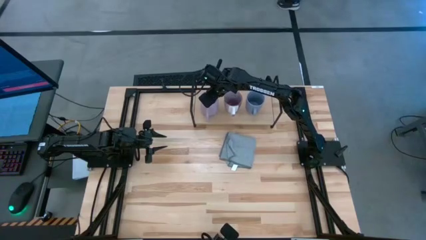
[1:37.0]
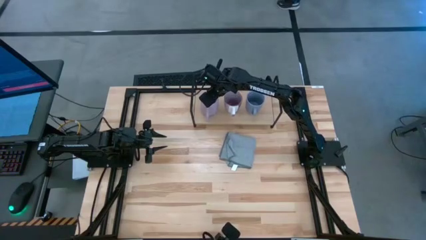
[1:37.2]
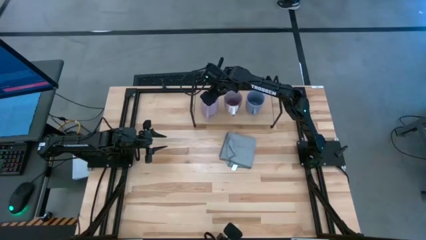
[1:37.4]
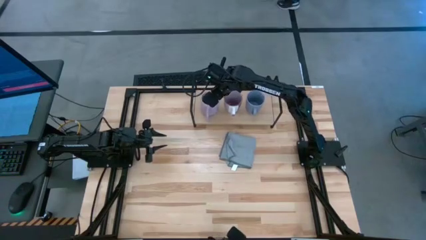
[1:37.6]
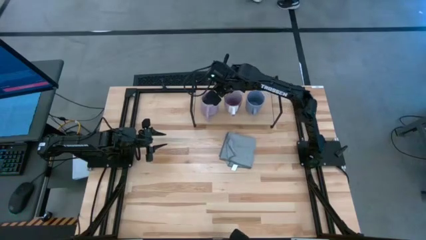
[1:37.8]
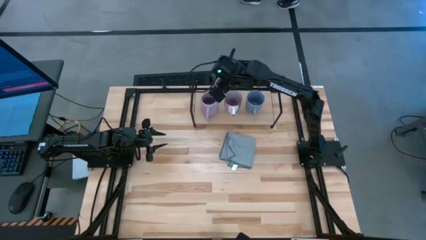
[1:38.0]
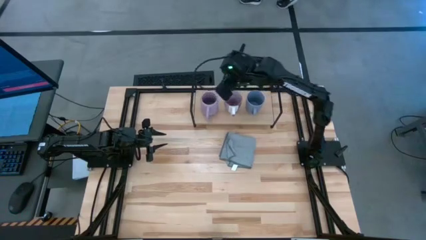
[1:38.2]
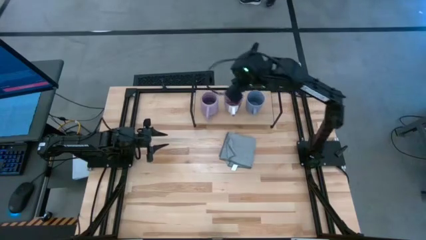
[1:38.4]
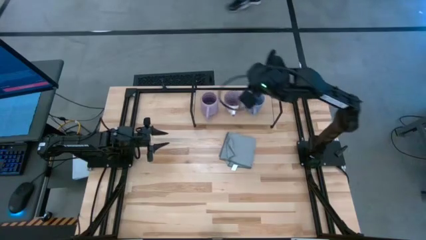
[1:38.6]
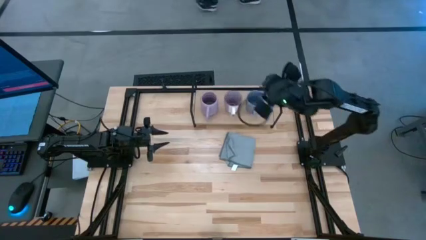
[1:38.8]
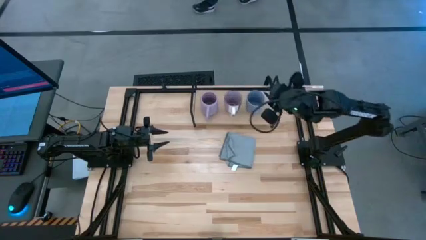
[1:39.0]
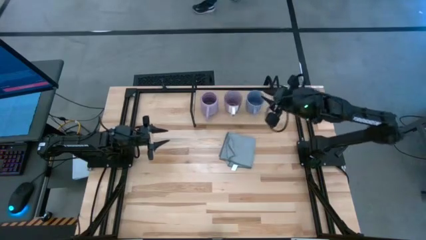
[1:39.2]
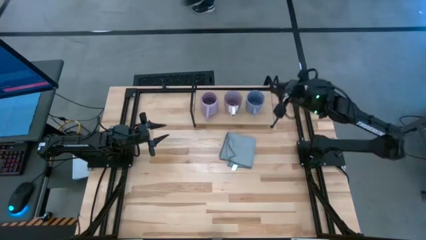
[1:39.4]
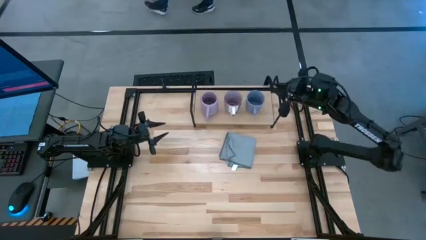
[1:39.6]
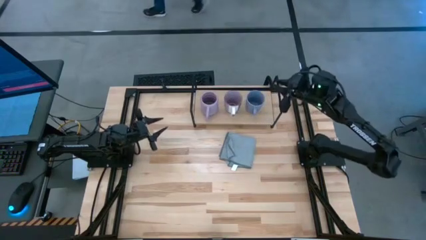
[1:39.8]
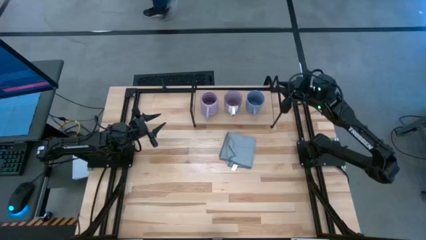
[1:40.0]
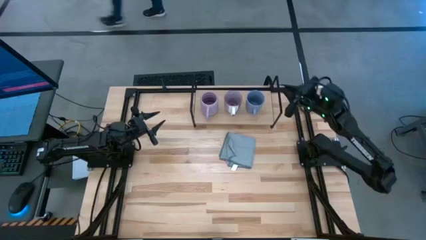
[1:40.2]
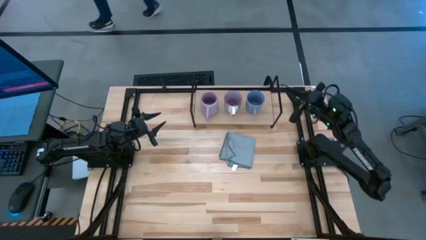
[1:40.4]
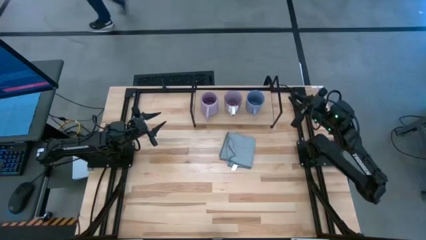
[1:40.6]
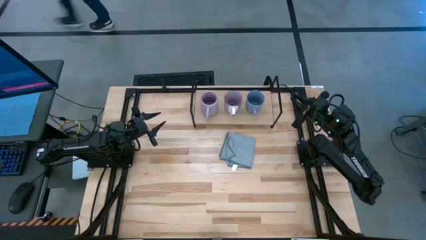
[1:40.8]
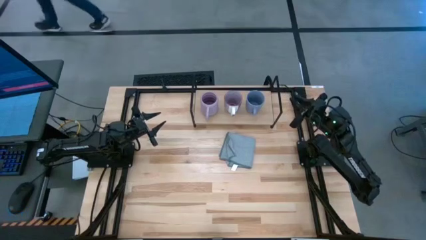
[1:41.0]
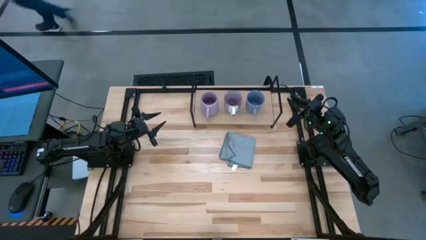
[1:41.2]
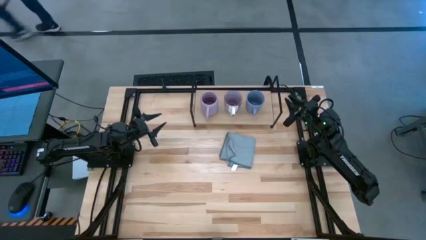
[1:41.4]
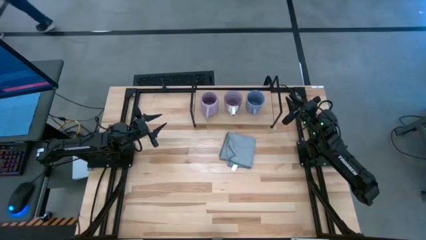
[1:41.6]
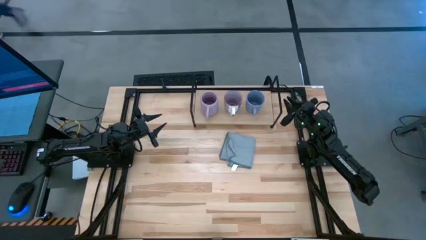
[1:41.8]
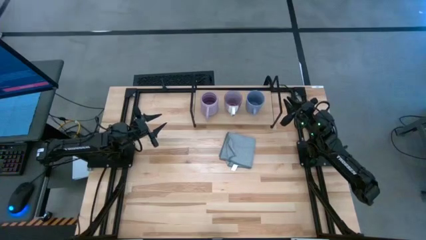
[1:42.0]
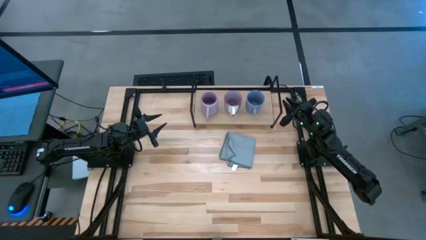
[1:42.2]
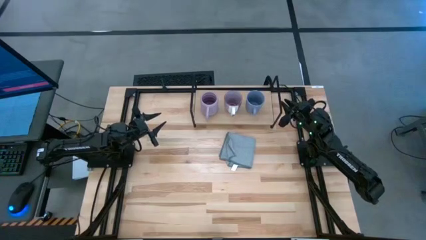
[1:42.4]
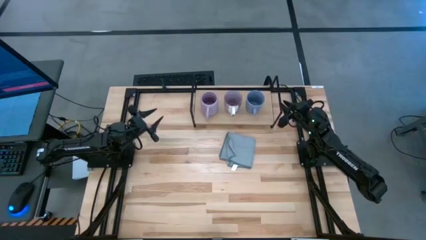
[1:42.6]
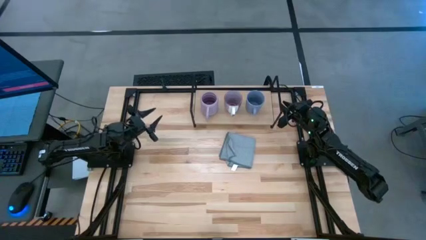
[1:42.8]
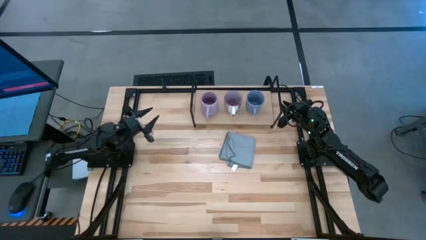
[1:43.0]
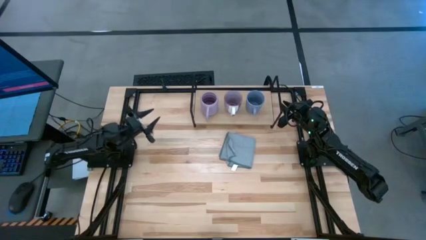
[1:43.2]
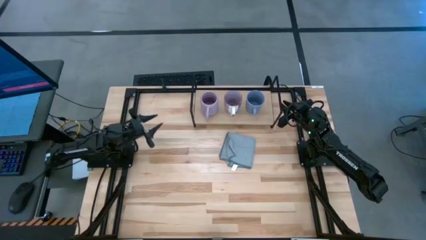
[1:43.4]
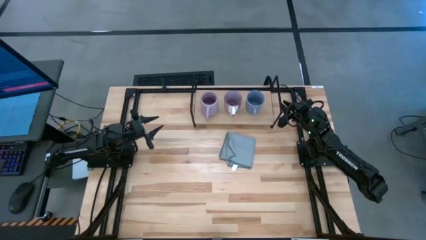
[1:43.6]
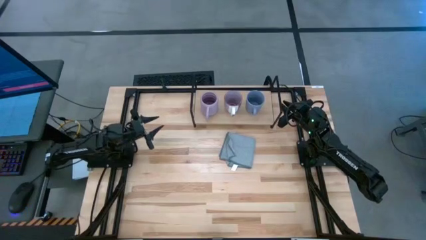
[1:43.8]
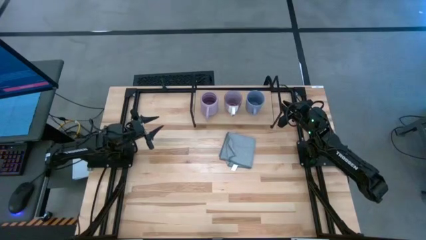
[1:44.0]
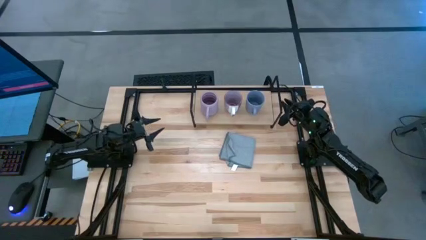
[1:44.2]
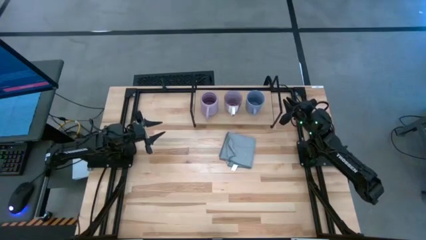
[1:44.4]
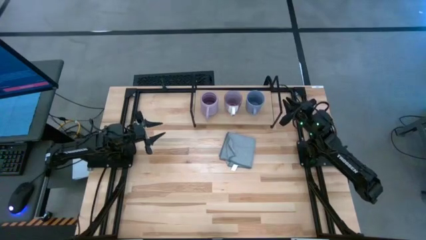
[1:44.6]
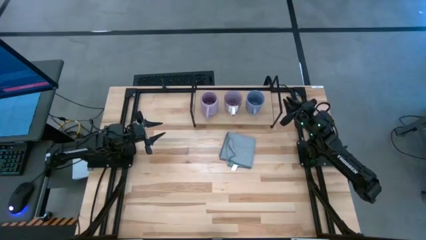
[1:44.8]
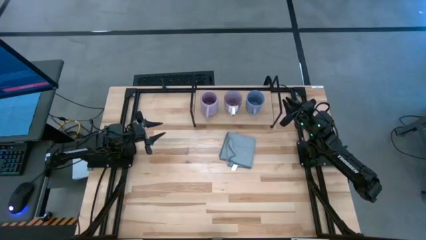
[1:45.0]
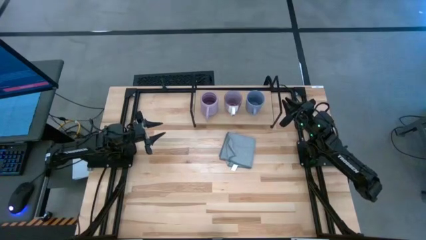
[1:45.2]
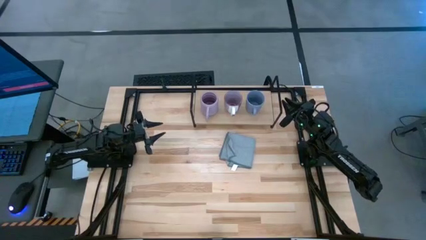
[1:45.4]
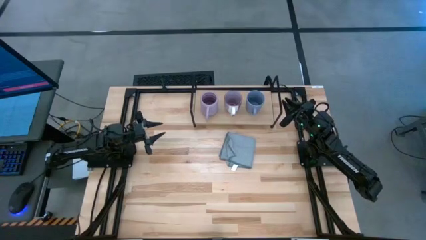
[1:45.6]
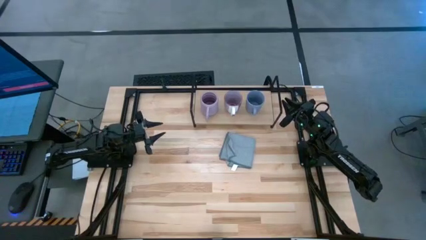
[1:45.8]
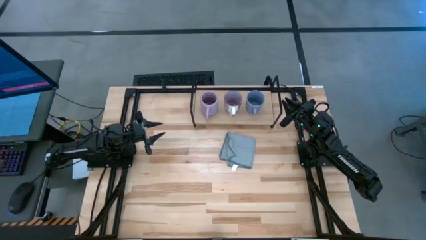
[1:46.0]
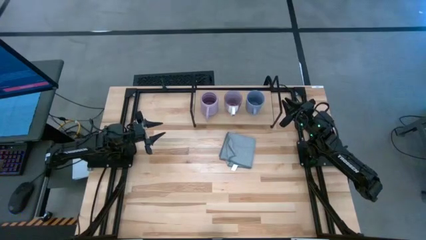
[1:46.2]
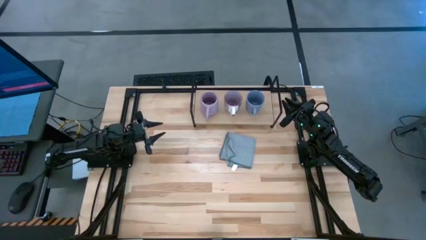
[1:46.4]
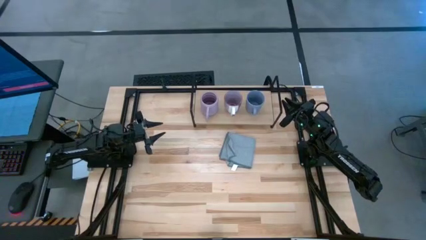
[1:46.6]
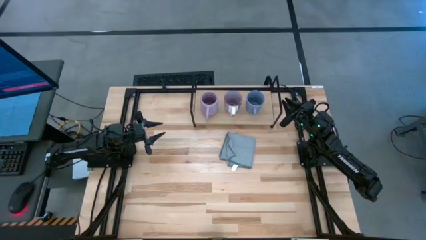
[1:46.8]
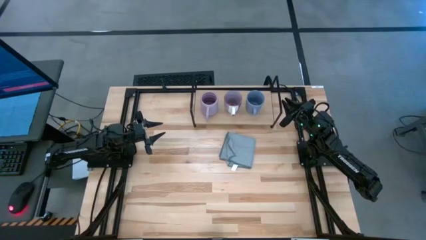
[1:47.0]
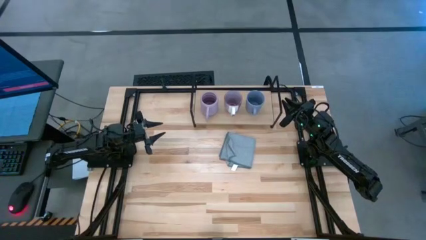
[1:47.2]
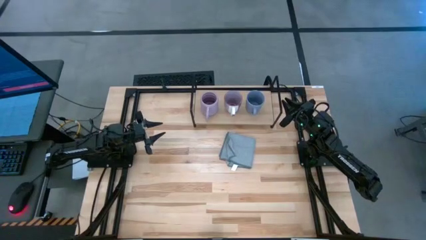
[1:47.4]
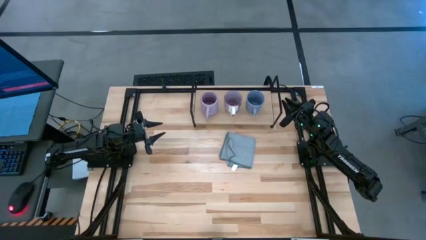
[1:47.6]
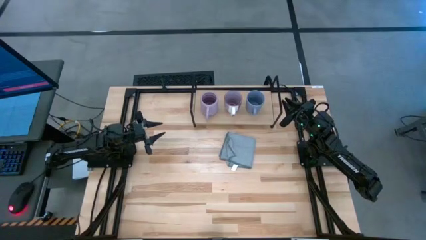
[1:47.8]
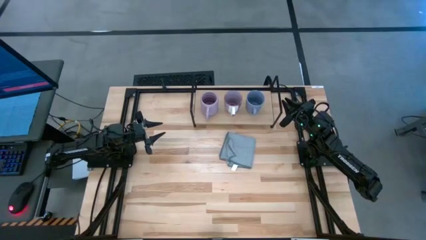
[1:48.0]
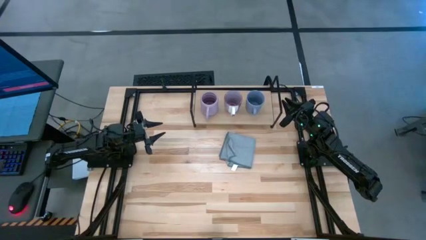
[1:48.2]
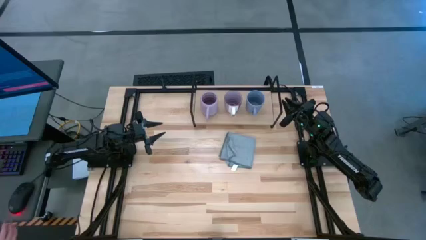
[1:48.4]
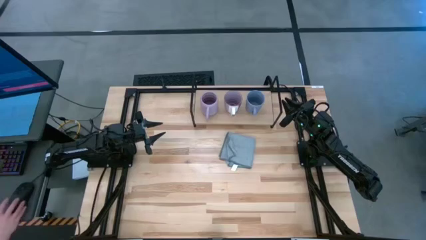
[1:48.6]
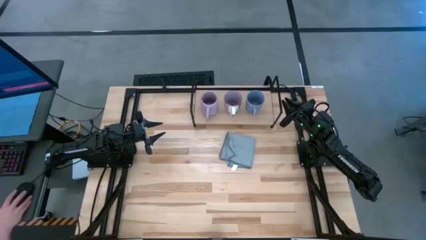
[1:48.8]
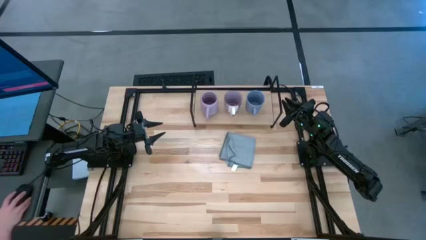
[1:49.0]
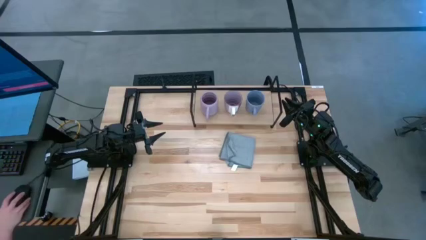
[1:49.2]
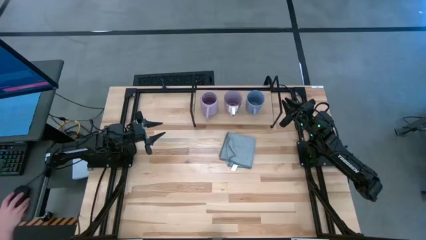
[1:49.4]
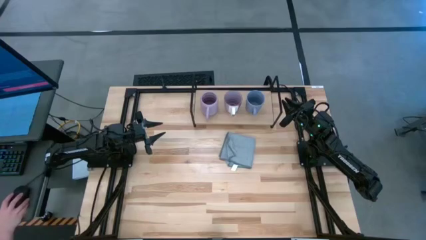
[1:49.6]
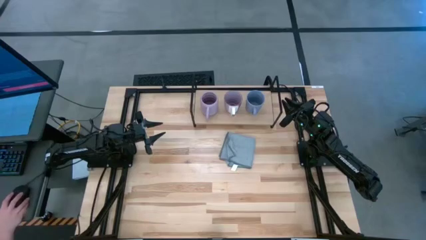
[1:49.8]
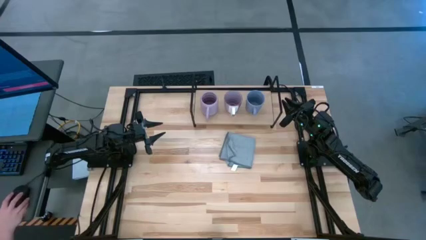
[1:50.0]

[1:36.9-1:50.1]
Task: Stack small to large cups/mugs on shelf
Return to Home Position
